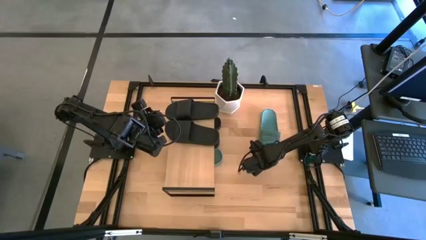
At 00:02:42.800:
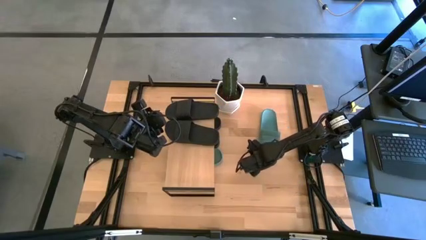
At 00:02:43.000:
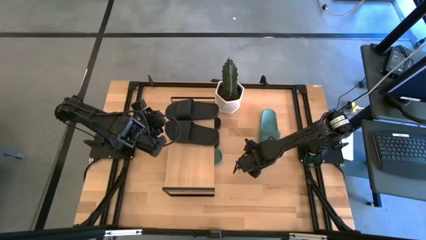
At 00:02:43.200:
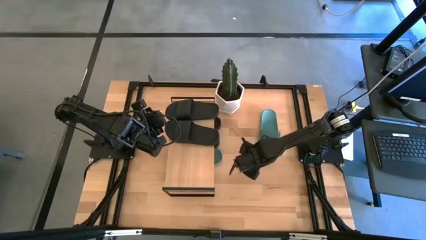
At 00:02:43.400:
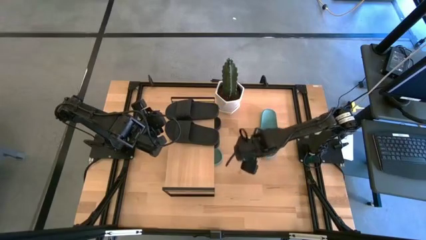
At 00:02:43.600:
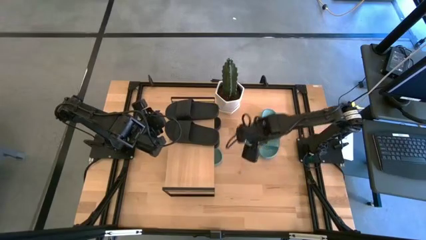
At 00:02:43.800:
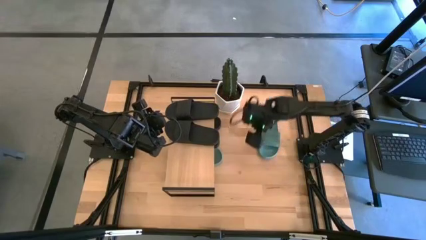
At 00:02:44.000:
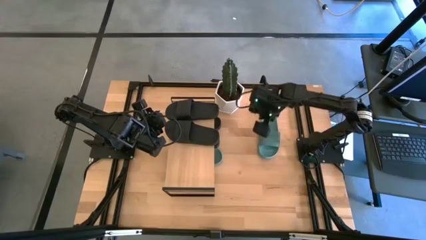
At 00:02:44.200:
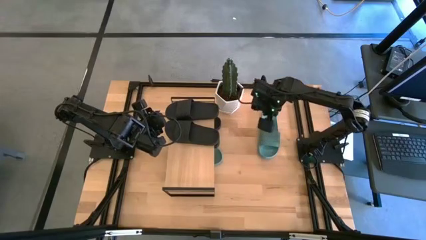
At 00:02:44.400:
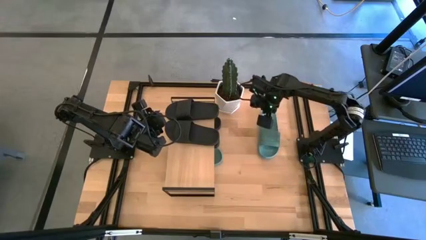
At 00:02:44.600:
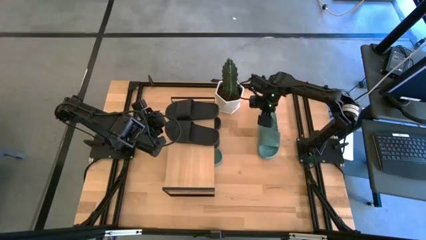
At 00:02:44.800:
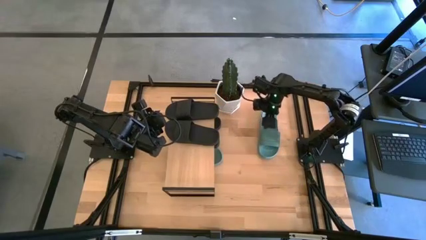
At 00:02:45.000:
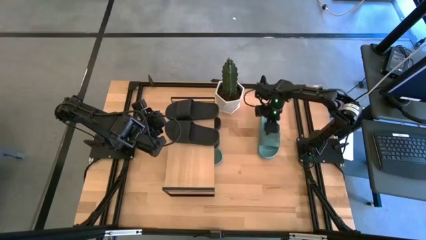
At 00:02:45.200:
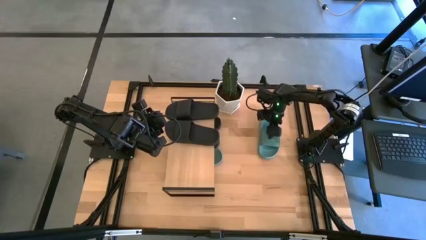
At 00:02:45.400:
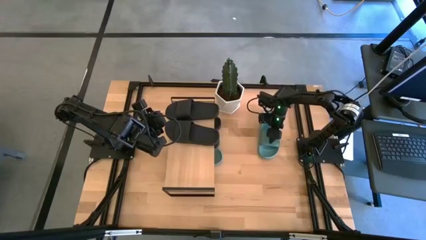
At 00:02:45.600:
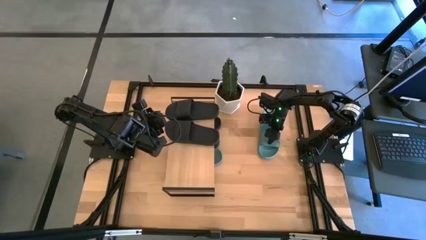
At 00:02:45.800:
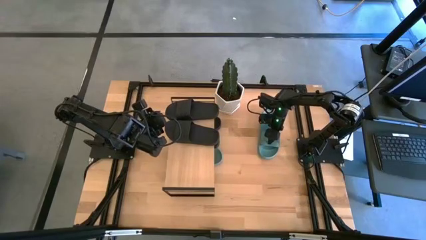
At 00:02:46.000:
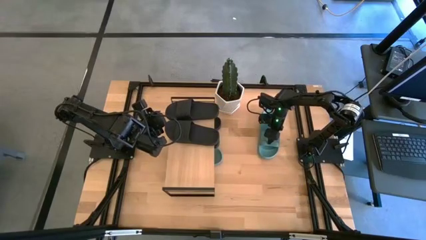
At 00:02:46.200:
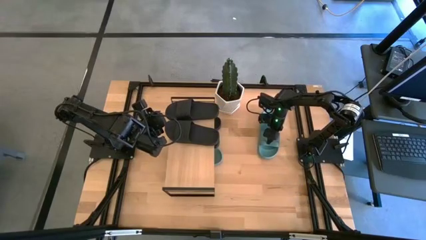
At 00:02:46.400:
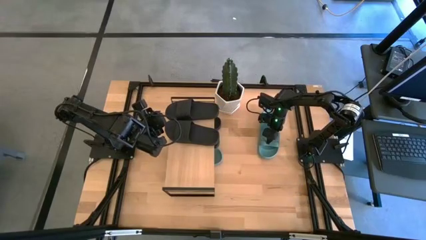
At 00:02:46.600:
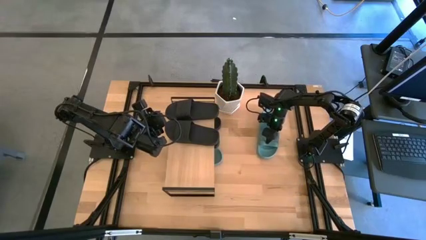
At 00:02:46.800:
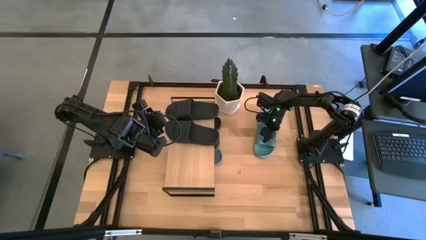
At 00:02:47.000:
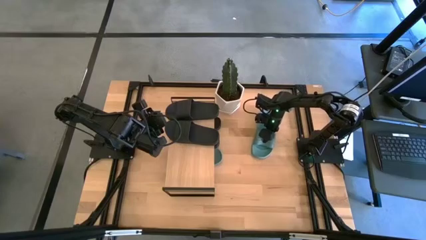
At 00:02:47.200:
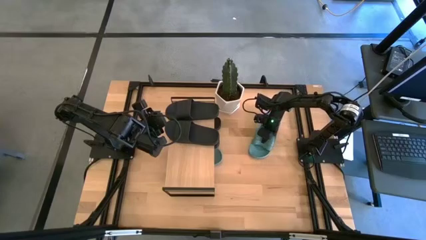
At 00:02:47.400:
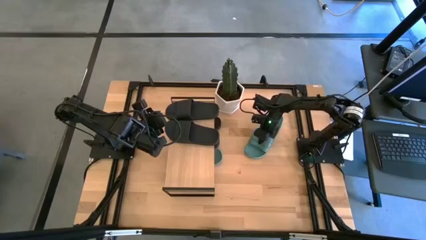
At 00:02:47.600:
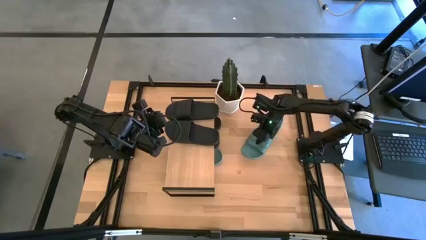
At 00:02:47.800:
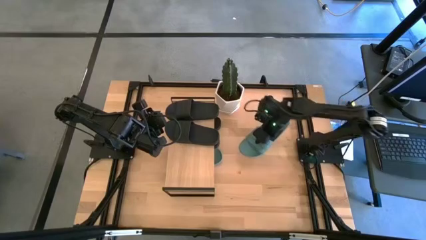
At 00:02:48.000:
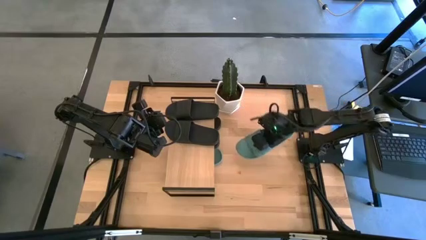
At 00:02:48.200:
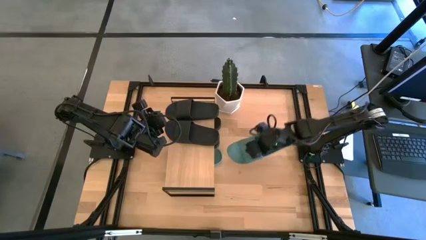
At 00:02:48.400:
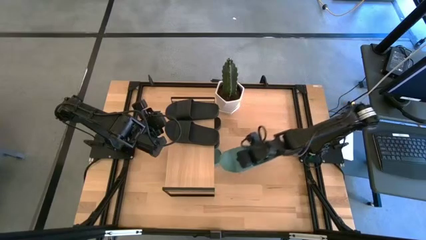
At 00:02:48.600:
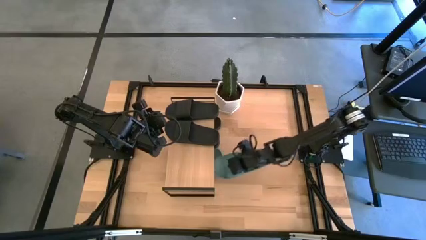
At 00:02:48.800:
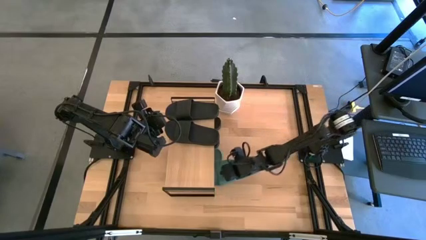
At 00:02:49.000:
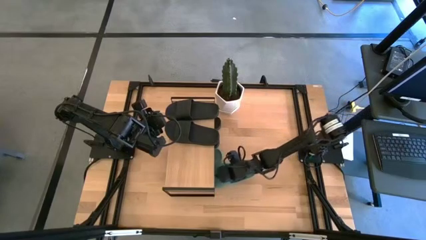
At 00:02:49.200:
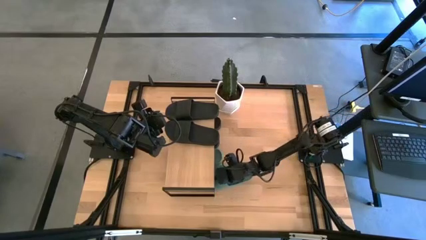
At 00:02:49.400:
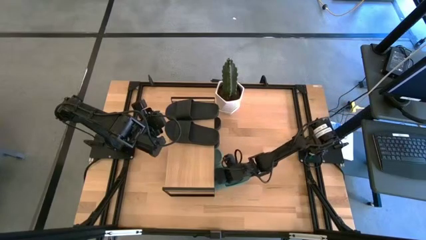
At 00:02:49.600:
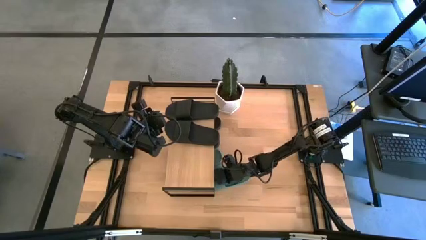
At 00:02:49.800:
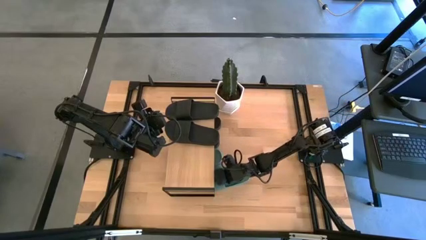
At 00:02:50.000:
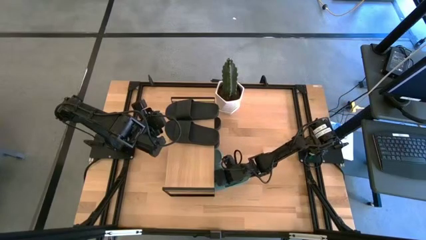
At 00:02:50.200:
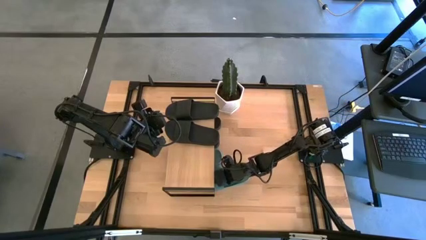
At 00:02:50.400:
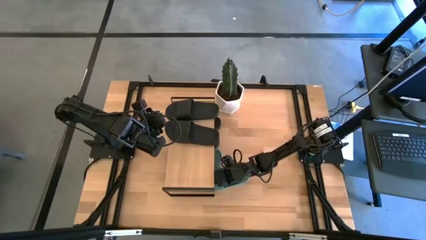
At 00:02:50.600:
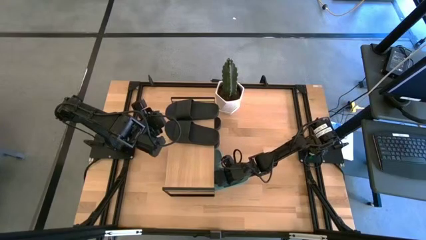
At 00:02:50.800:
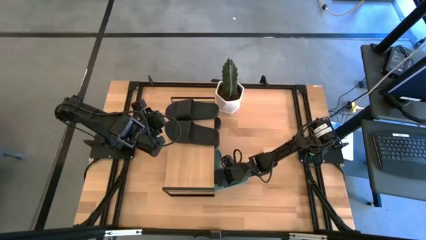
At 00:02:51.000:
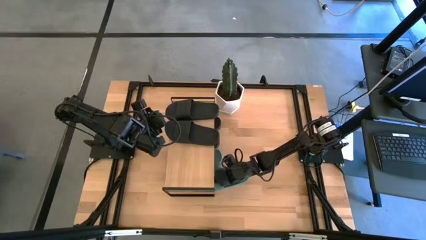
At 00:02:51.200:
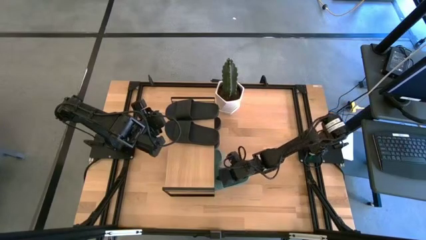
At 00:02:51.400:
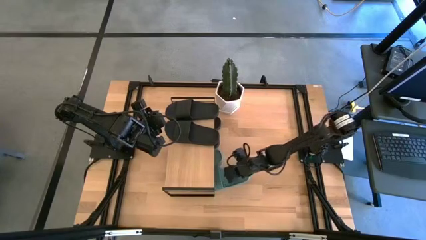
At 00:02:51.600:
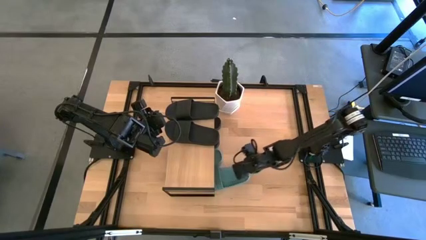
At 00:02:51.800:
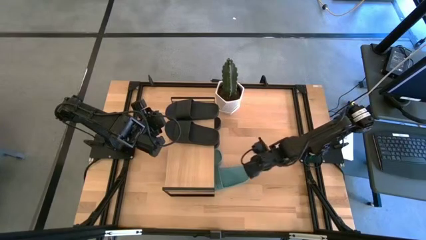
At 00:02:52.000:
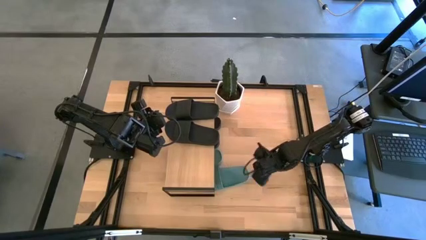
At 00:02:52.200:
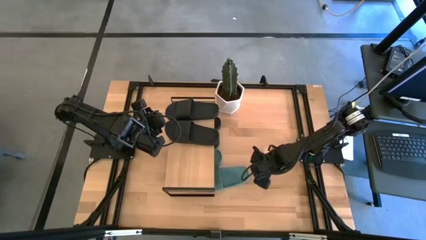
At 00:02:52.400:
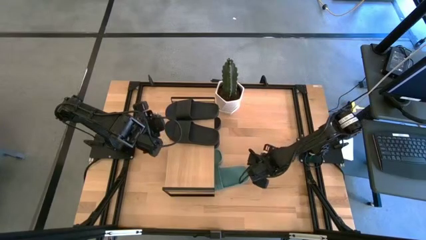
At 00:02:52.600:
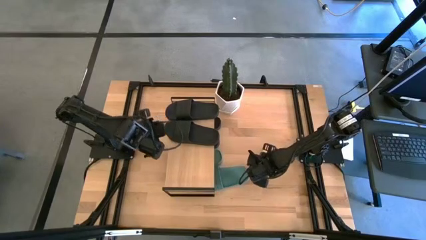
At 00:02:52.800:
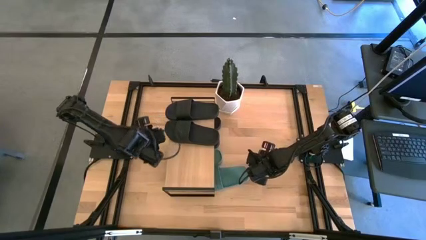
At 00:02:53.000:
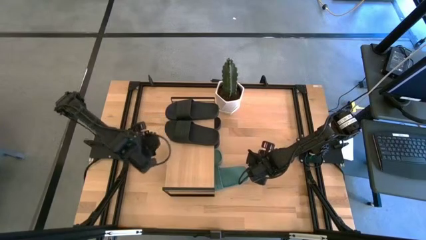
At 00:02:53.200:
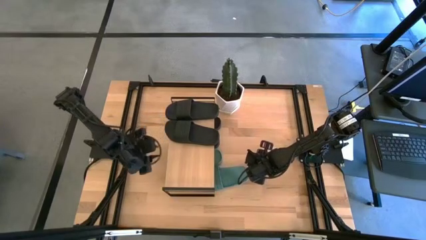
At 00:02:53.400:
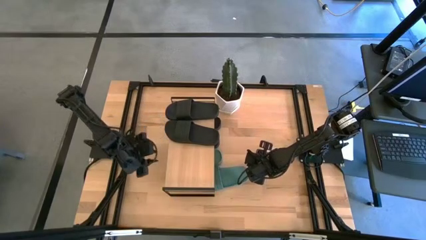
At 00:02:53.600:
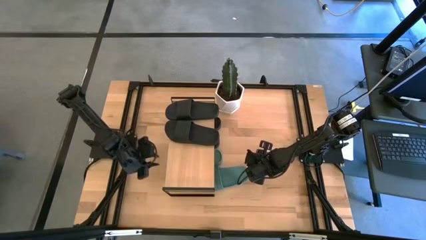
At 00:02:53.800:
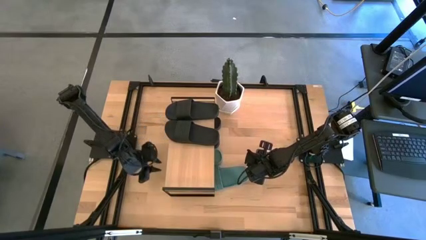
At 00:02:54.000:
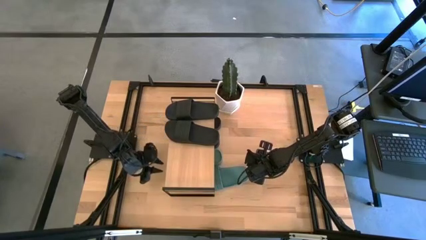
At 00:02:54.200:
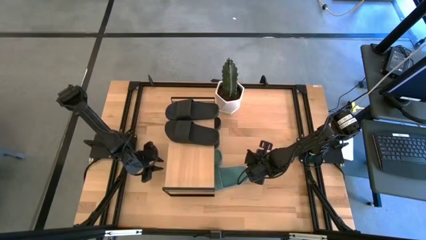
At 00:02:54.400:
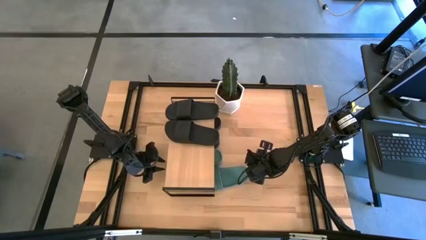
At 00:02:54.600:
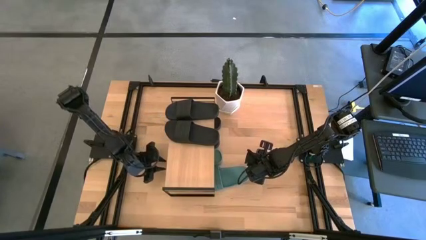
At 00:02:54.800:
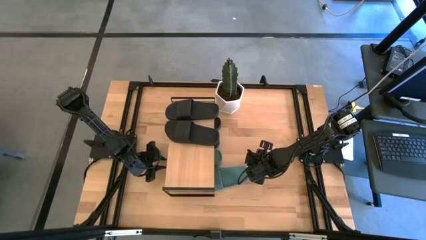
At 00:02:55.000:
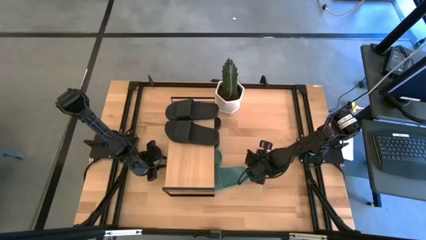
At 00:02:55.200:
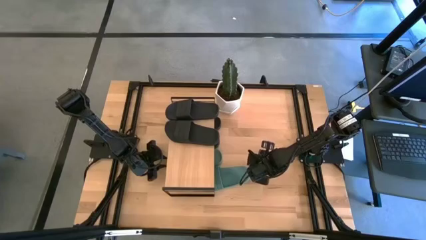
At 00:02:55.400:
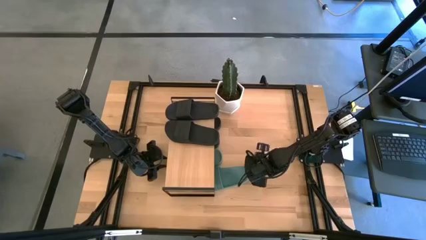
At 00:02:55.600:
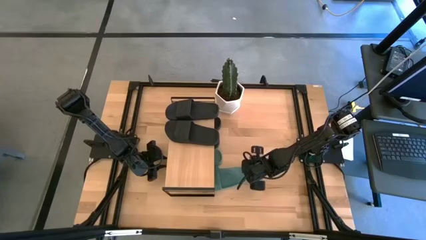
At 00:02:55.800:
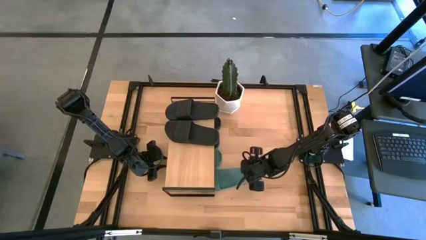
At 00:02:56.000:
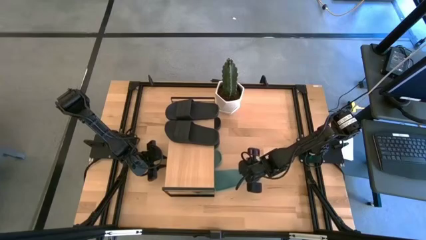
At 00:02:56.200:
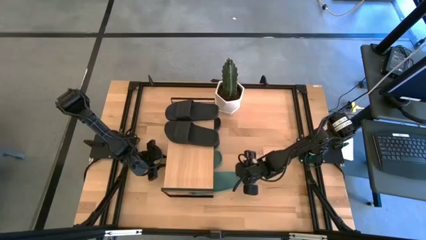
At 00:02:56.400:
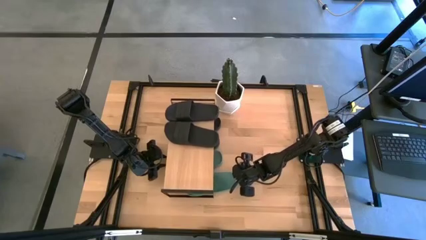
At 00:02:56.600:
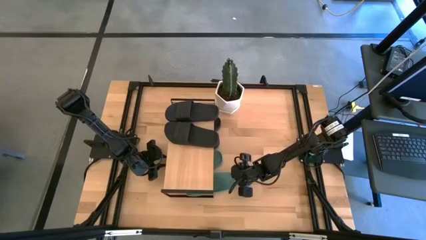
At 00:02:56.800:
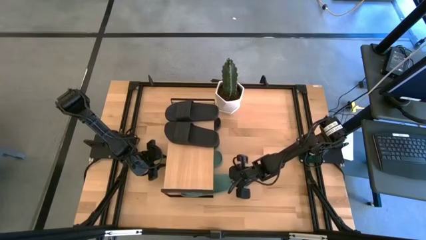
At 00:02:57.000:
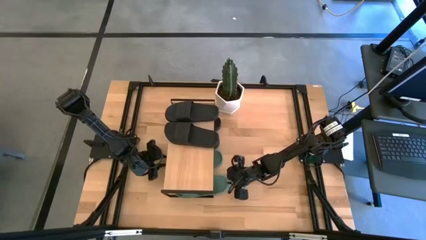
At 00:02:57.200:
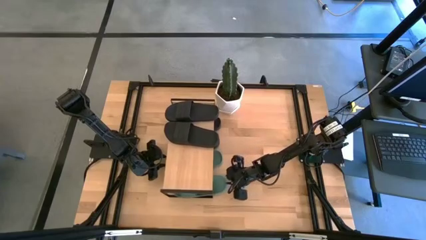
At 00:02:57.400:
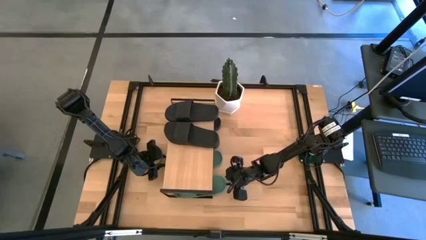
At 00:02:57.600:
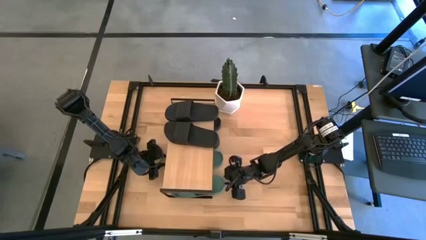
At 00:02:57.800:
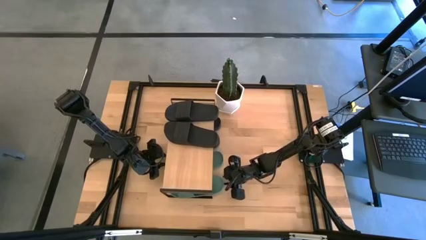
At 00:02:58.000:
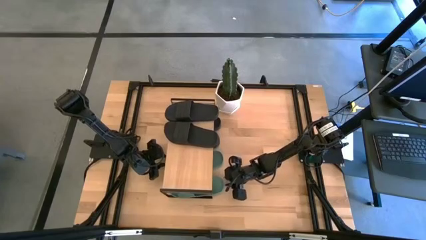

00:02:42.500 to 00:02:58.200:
Task: Pick and place slides into the shelf
Put the green slides under the shelf
